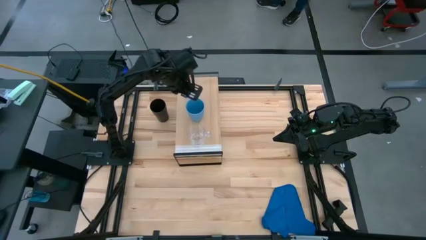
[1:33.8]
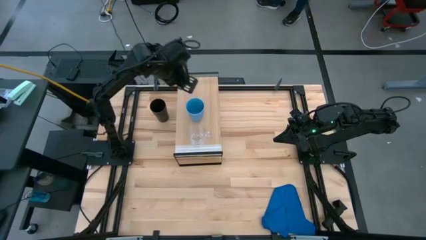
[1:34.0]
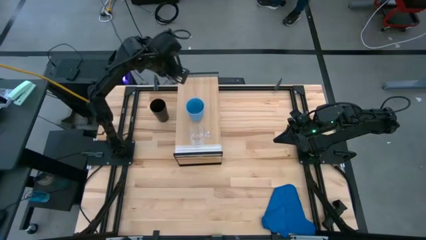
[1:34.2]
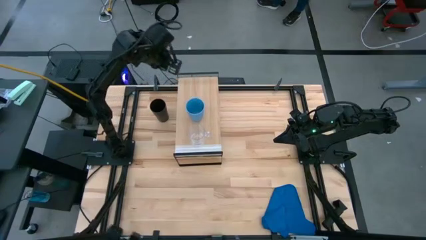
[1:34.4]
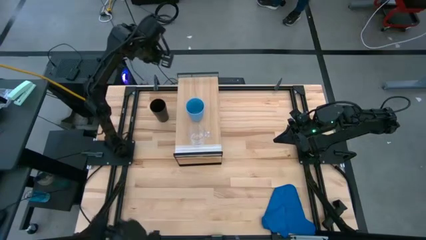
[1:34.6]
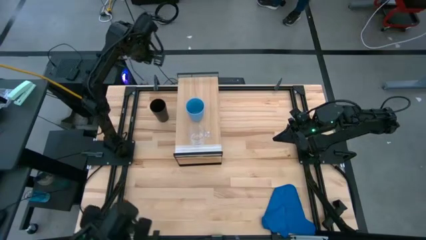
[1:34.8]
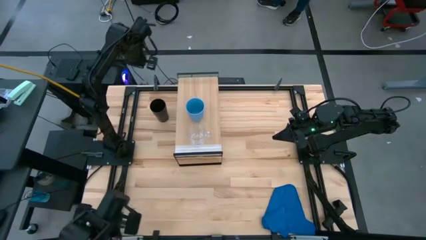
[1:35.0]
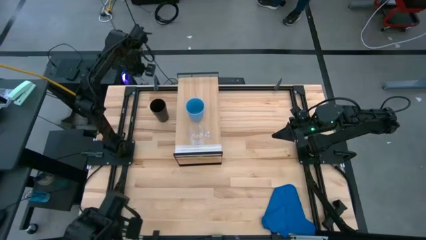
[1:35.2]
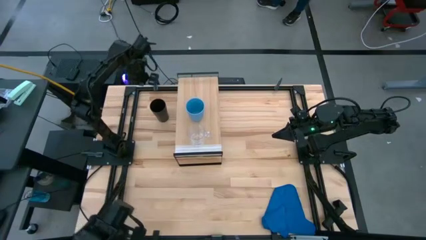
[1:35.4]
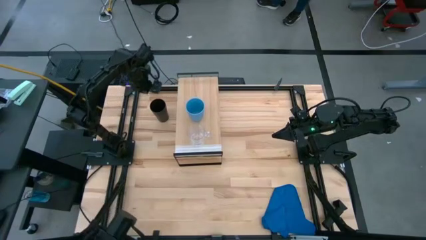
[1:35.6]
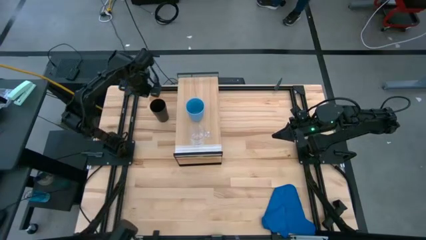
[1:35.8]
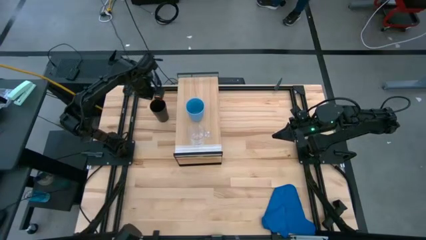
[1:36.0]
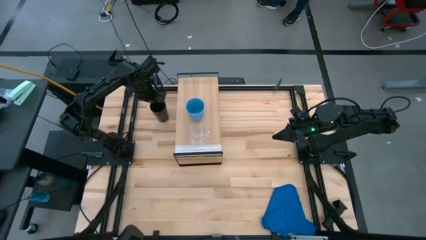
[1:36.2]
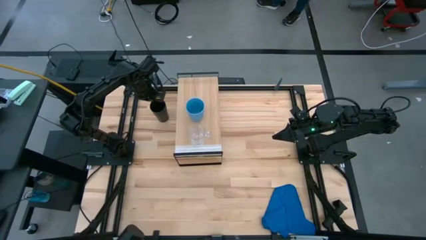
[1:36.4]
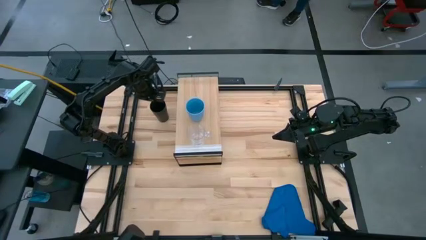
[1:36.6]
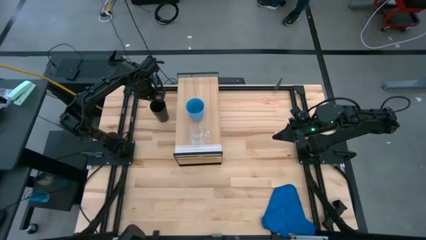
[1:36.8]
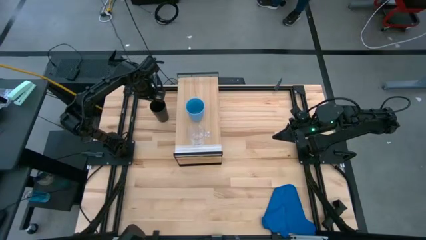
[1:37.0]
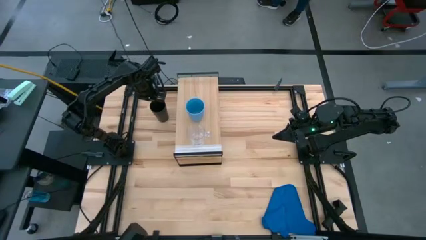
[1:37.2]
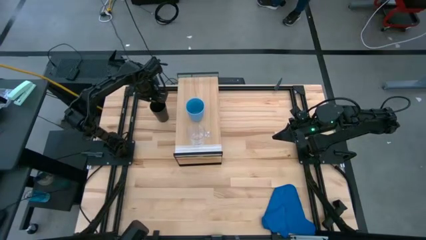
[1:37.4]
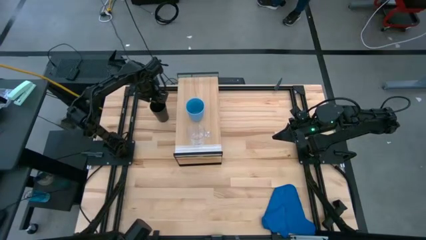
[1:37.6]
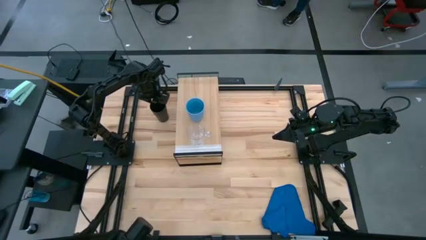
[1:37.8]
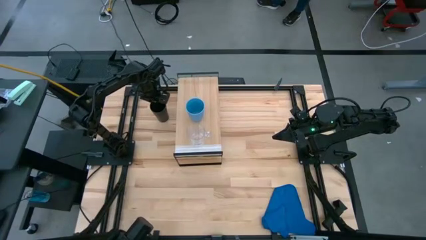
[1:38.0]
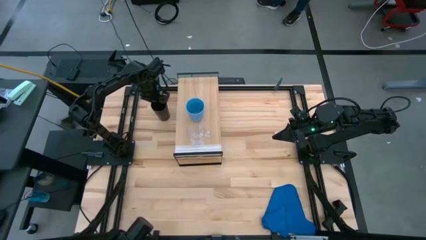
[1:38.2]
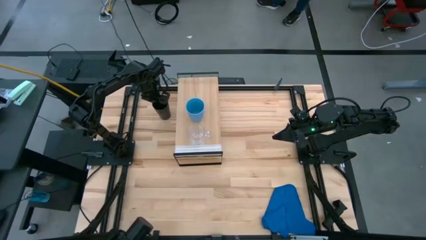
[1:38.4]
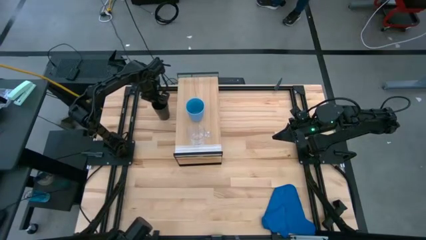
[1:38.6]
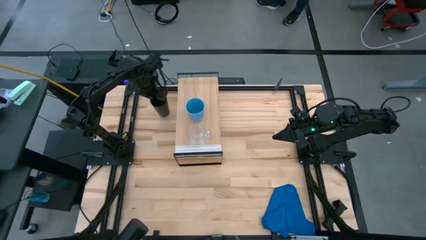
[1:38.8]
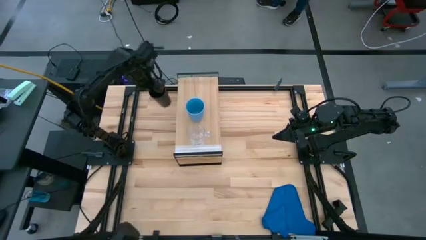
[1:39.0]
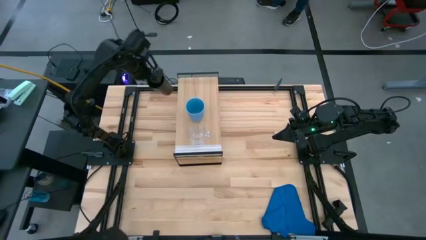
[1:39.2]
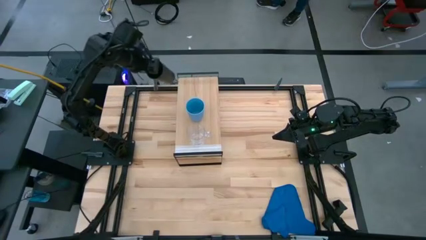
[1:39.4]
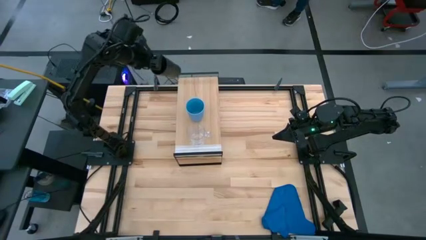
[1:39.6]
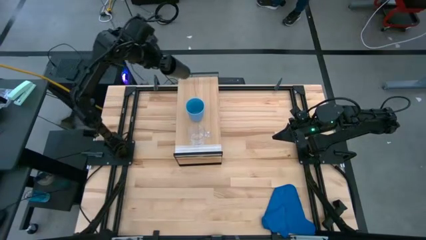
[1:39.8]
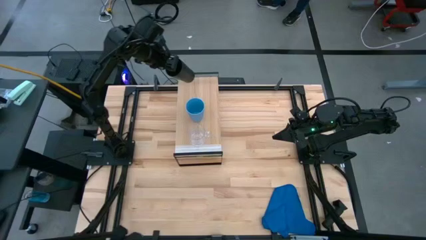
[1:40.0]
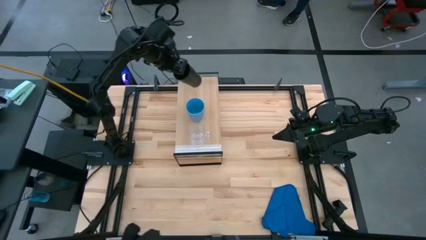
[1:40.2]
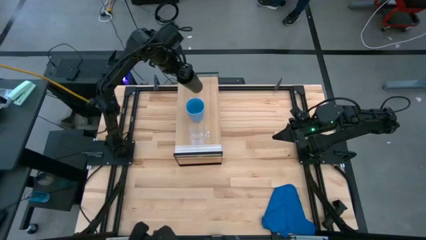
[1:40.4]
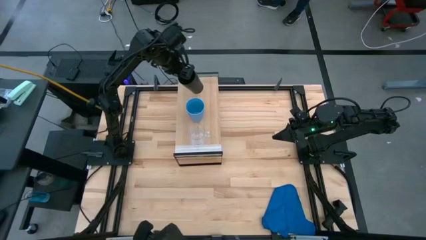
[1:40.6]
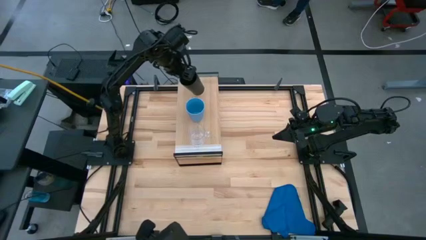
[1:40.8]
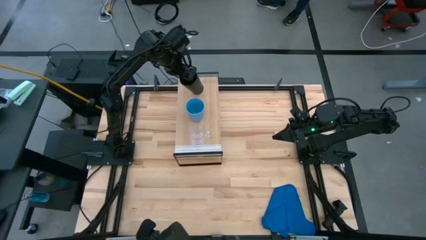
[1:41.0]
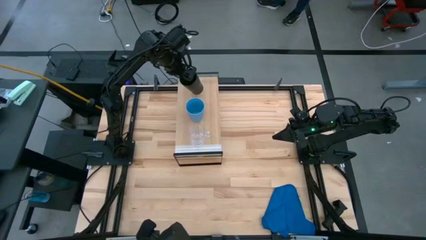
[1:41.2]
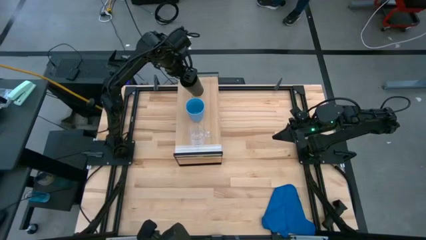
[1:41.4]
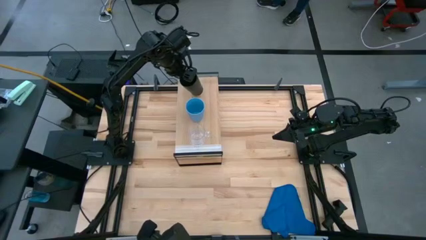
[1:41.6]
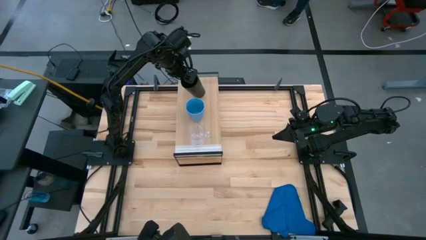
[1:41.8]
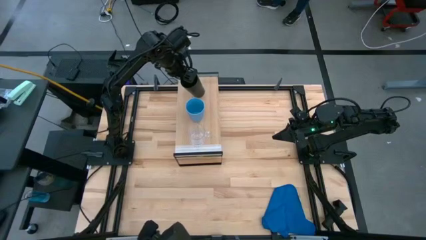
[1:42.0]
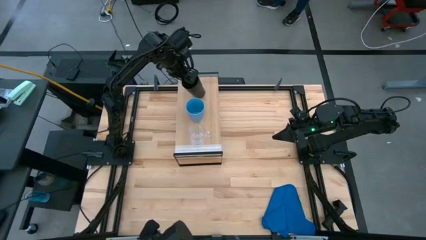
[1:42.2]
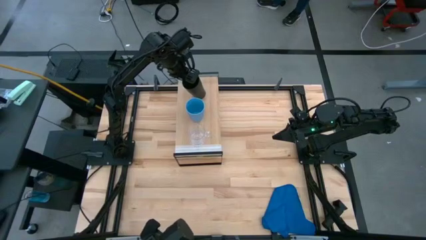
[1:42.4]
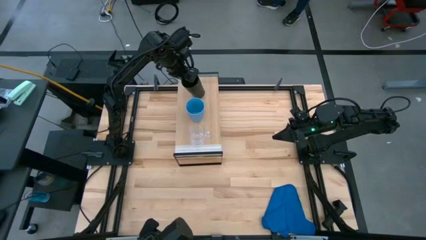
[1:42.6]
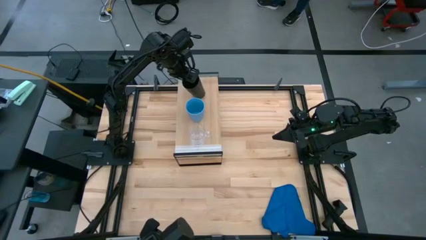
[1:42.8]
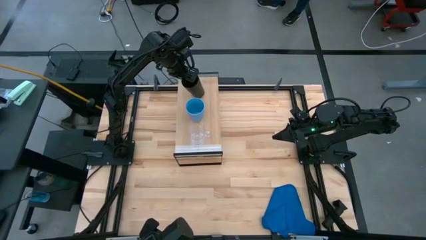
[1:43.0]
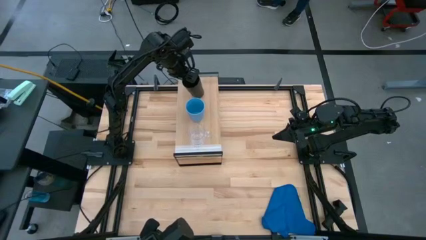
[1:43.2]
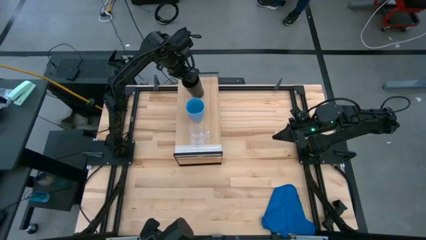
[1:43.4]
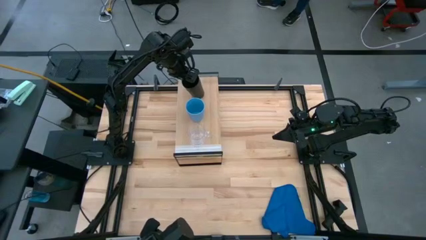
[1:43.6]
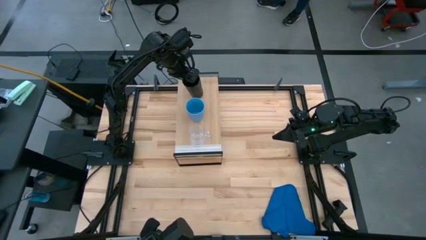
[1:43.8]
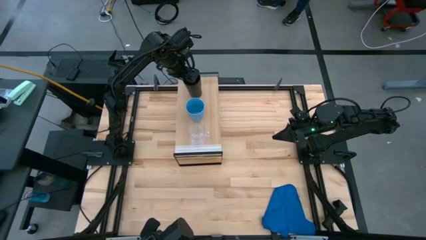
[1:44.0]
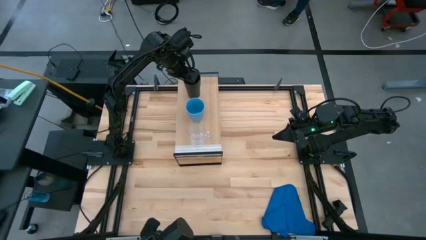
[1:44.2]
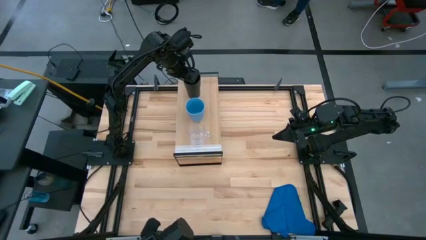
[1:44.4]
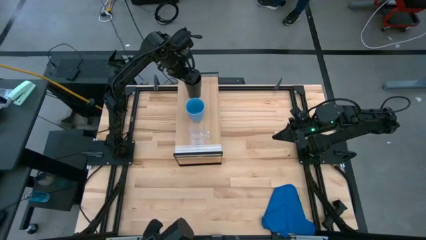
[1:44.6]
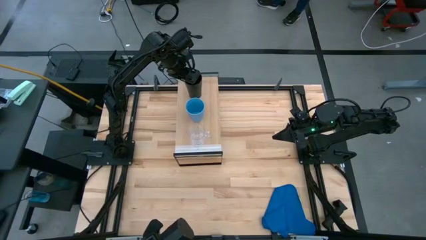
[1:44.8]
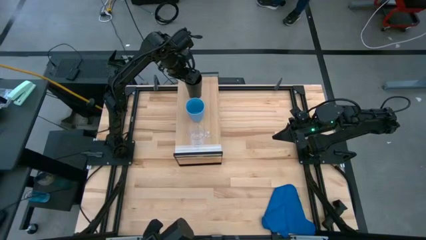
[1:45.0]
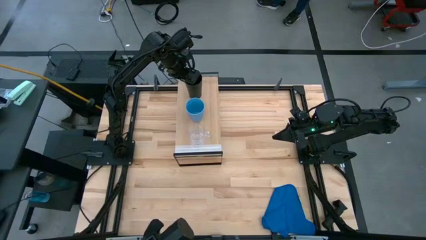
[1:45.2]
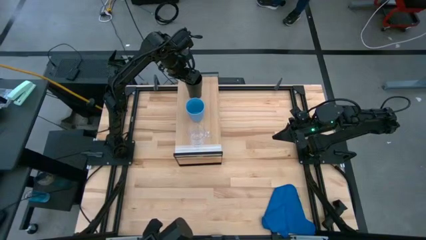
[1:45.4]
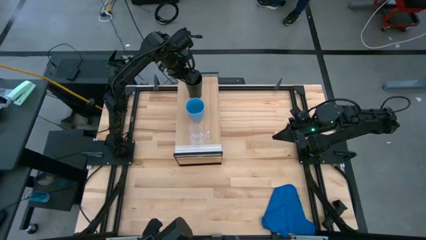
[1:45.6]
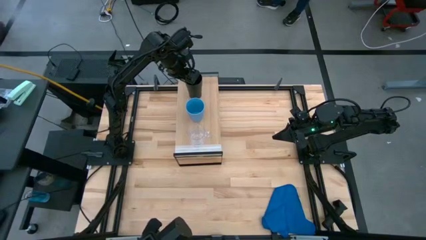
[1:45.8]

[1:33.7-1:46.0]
Task: Stack small to large cups/mugs on shelf
Put the black cup on the shelf
